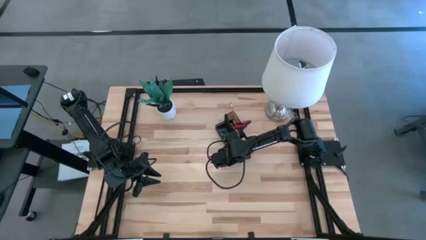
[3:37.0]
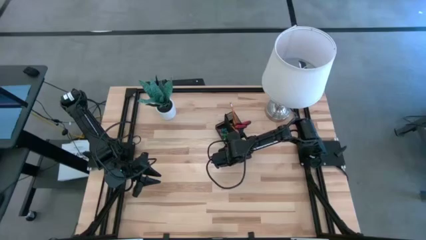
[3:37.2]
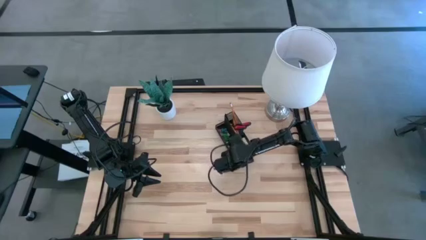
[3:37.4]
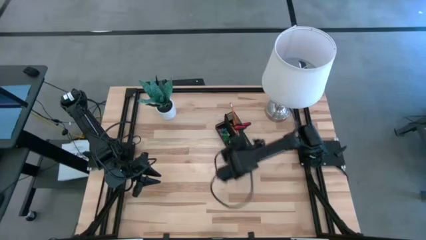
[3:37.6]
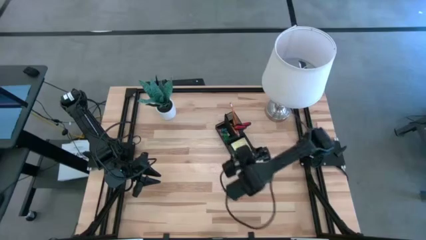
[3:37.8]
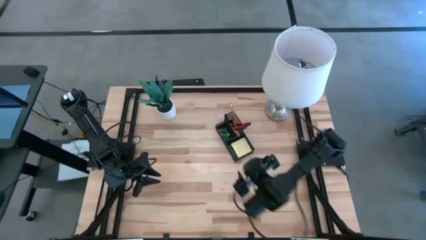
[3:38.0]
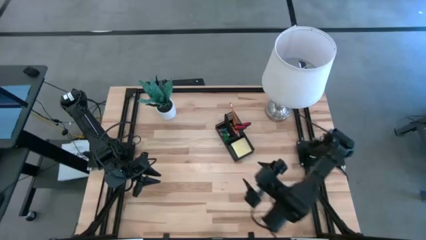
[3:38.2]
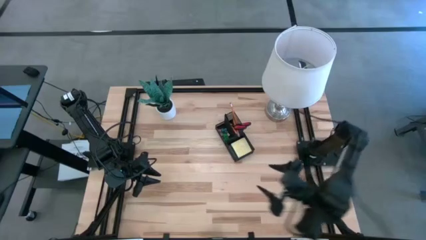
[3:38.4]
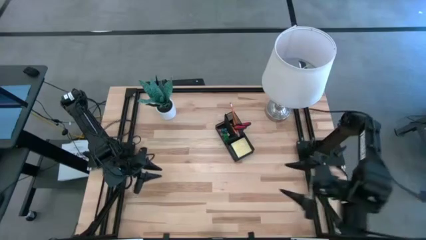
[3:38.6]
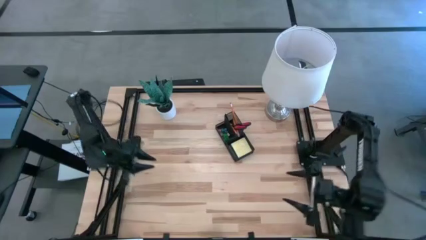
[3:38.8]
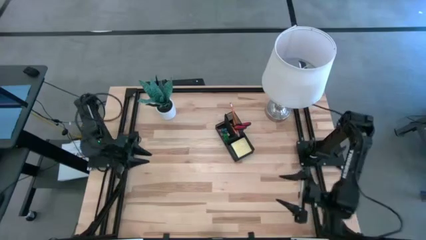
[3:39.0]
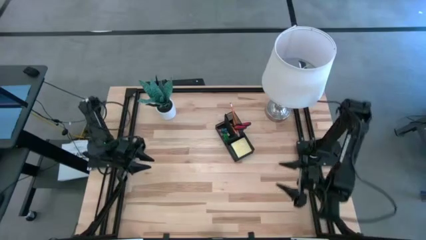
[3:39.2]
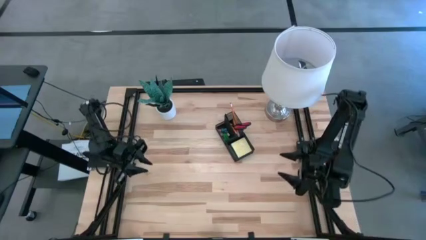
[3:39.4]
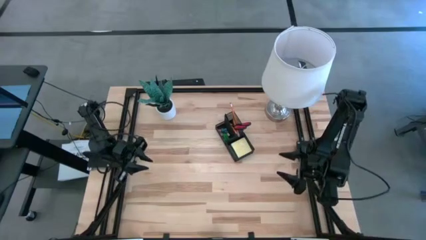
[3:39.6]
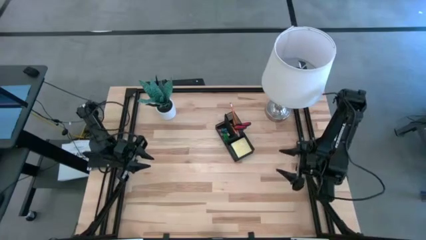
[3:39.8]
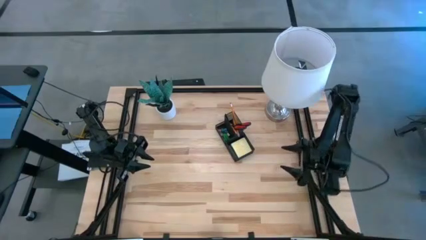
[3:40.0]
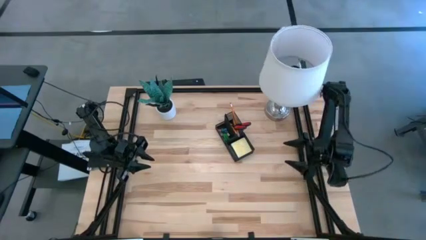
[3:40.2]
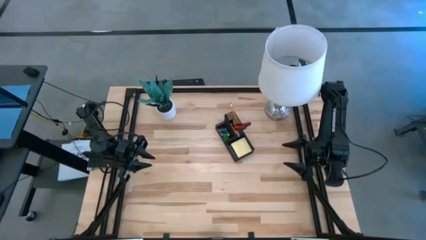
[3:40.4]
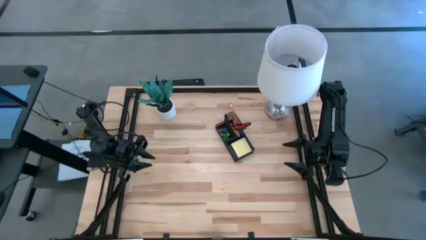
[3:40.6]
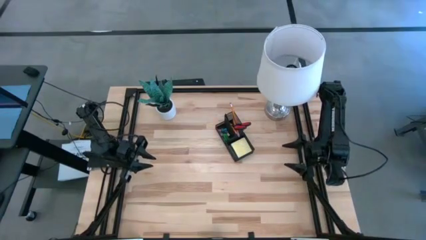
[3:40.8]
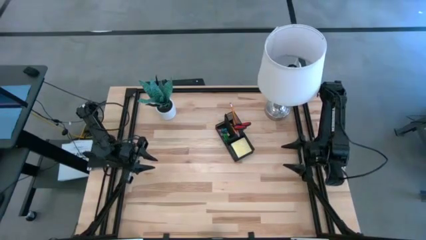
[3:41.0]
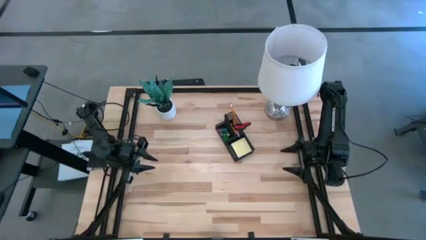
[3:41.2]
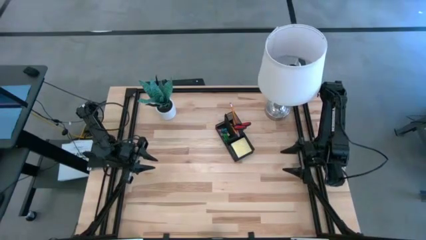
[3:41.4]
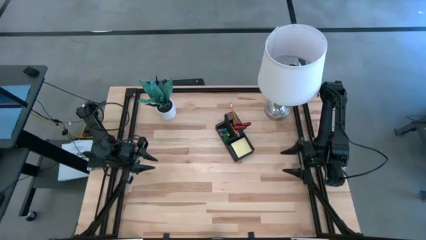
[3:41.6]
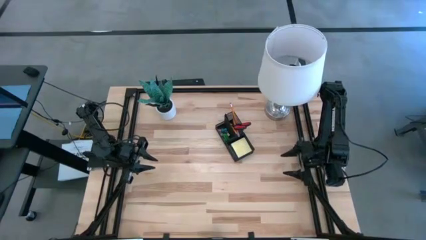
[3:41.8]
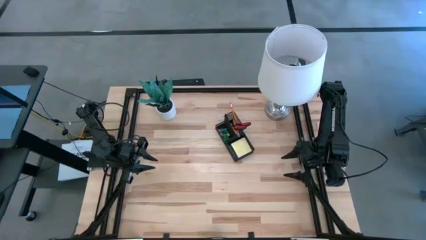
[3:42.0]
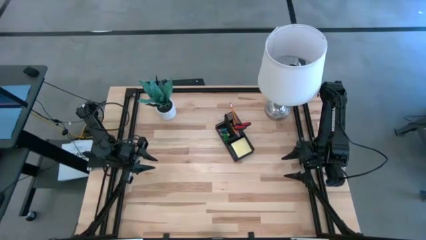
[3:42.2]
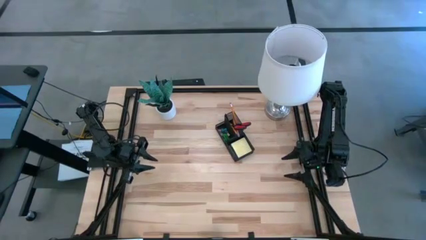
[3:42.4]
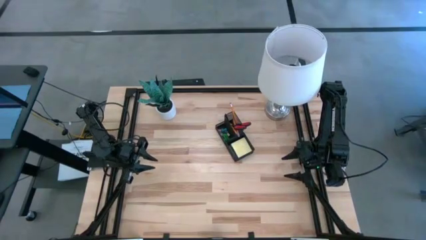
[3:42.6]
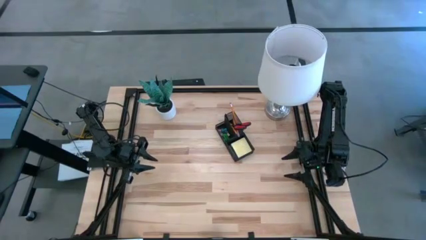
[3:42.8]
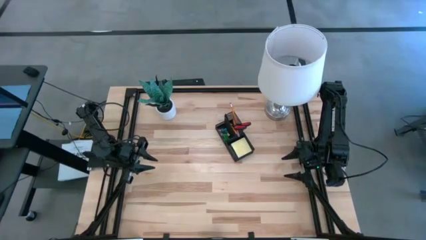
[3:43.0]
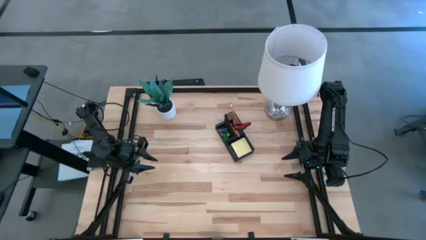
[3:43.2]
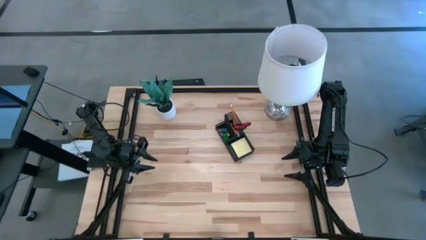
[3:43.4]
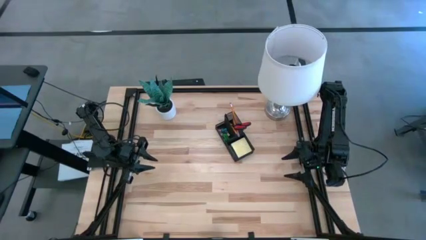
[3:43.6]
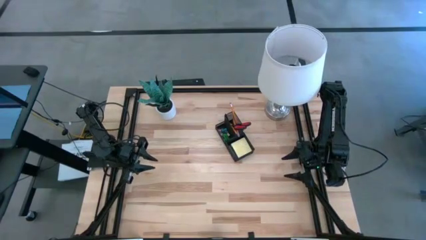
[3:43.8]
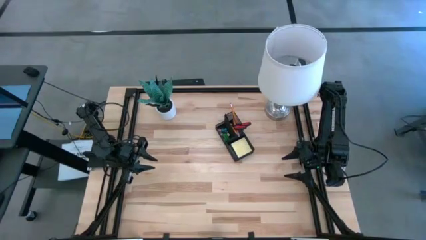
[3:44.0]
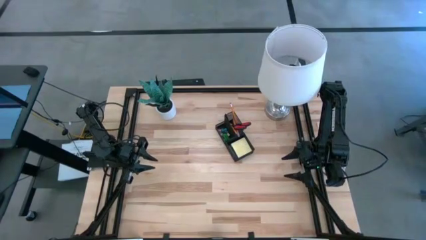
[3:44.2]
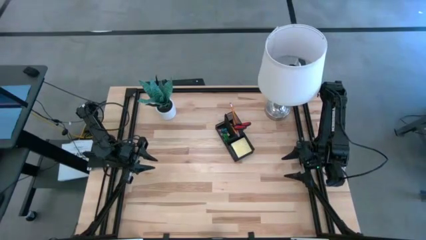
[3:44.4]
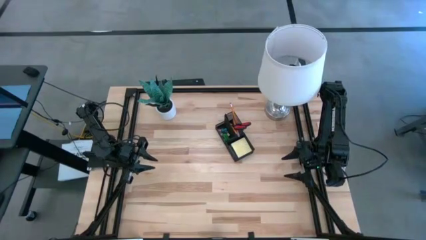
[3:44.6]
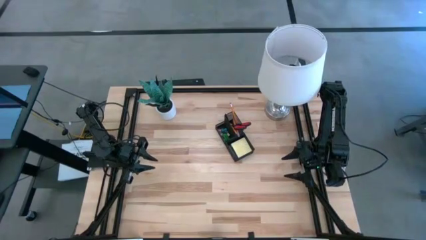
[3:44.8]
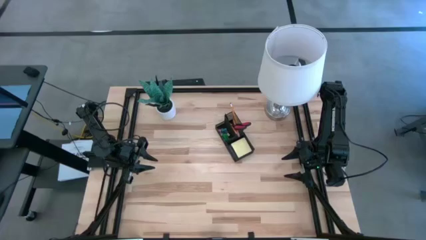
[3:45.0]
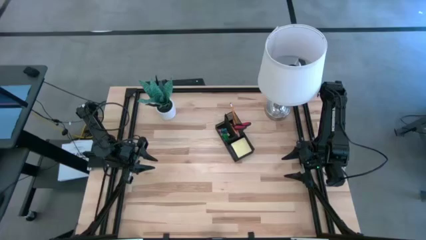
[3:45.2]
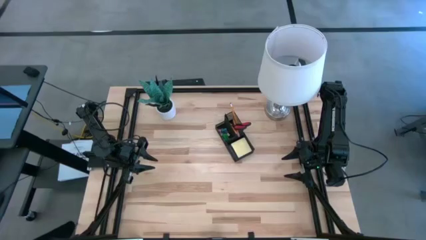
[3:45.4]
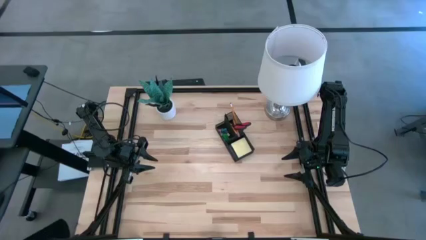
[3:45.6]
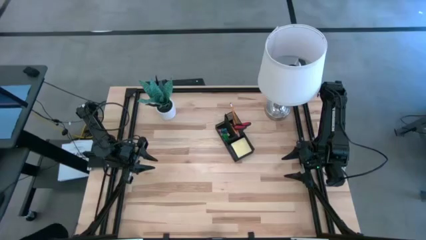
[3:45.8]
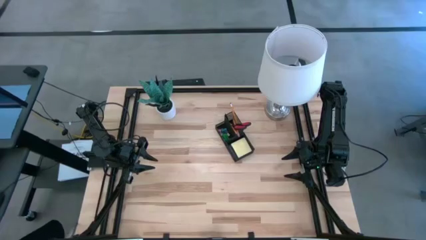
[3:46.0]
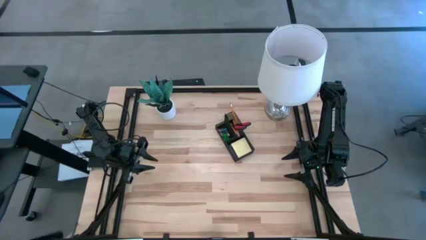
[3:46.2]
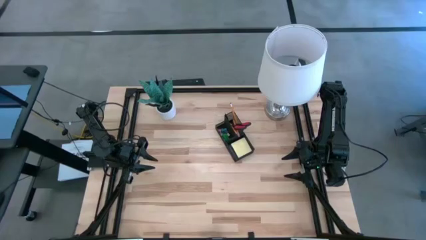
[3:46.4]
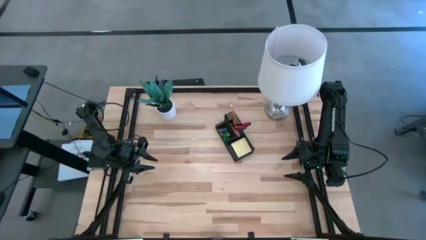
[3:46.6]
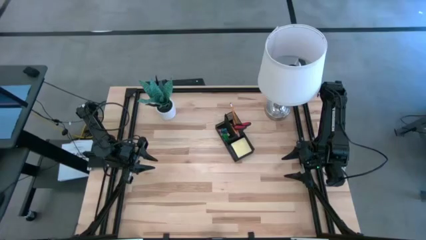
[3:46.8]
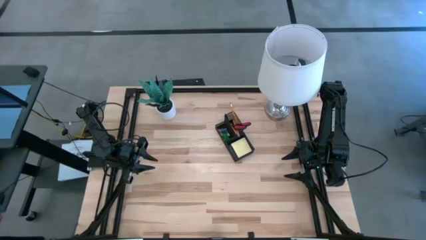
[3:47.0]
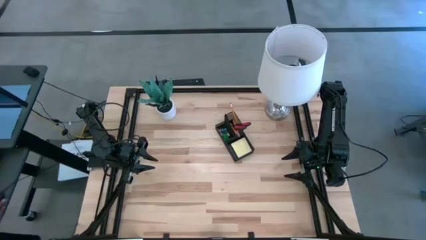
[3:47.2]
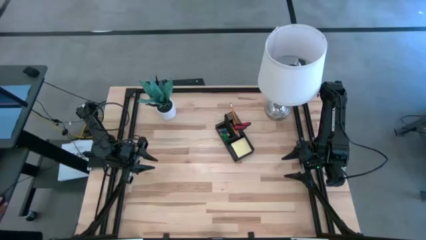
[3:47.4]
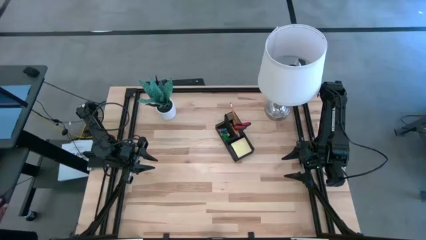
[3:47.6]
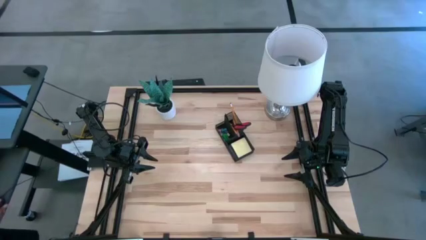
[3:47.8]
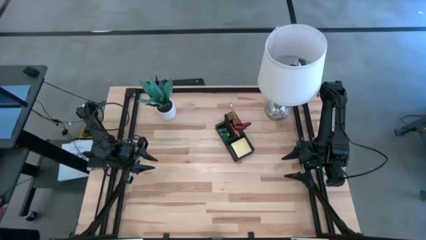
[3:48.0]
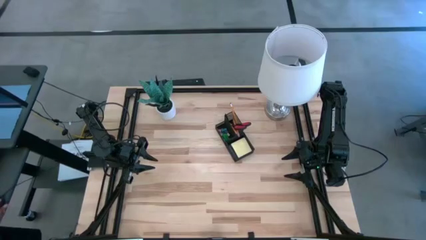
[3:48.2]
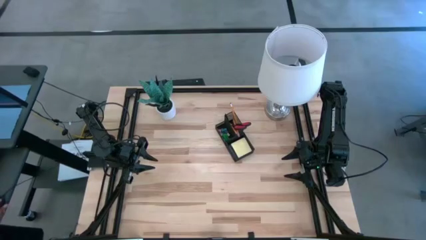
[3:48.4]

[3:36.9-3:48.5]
Task: Pick and place office supplies into organizer
Return to Home Position

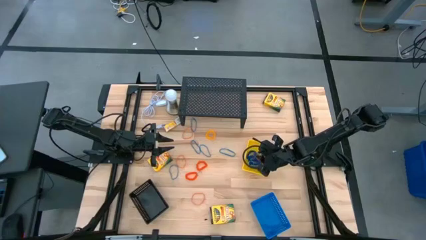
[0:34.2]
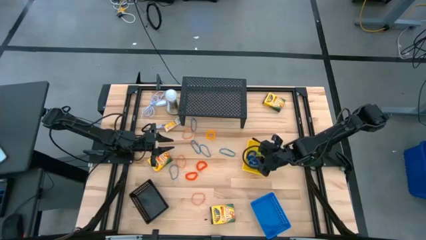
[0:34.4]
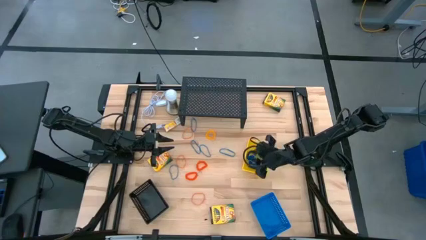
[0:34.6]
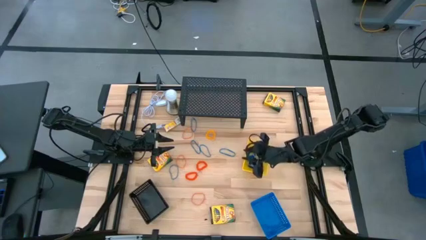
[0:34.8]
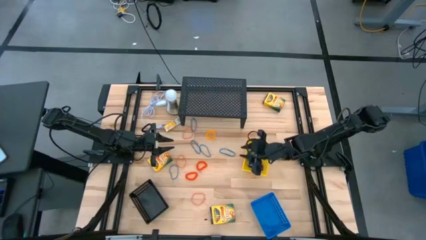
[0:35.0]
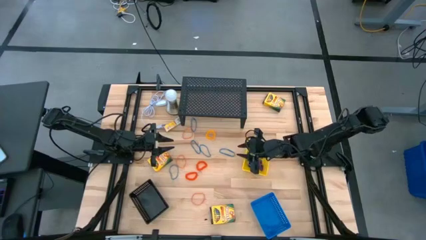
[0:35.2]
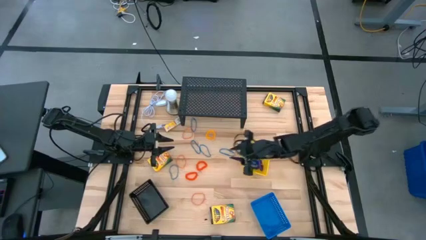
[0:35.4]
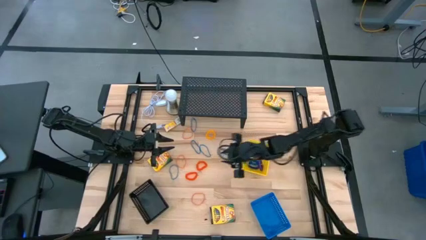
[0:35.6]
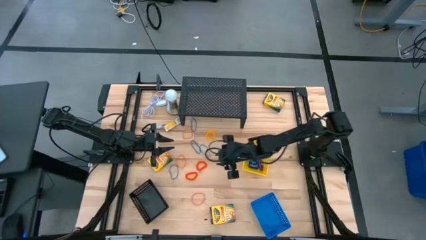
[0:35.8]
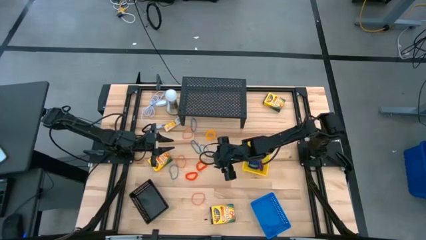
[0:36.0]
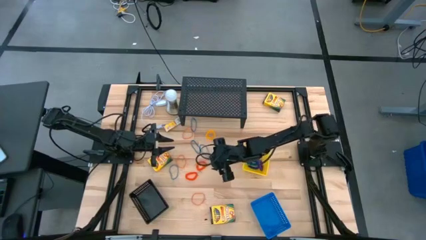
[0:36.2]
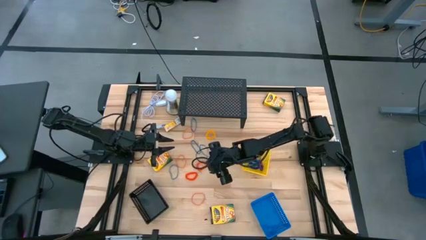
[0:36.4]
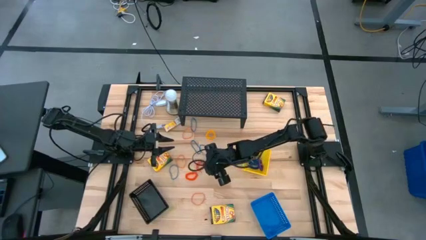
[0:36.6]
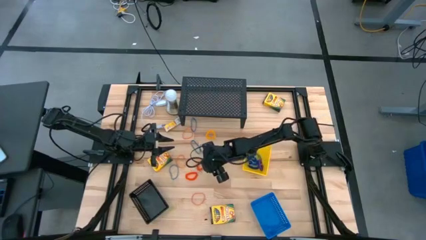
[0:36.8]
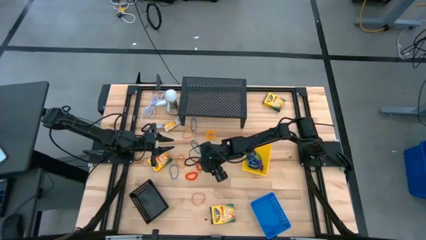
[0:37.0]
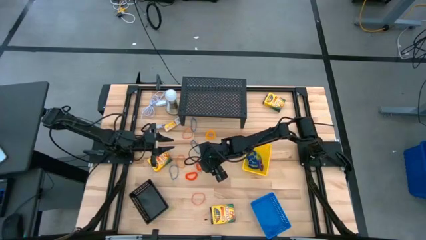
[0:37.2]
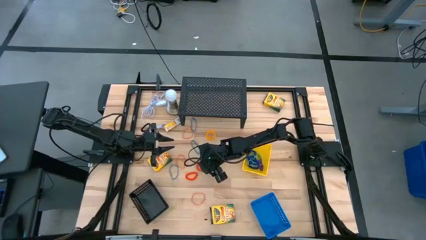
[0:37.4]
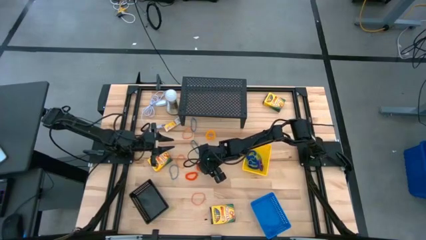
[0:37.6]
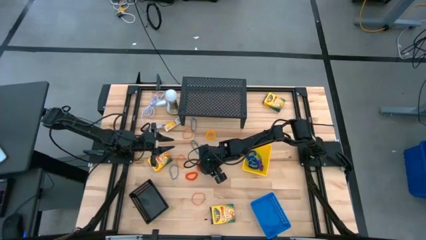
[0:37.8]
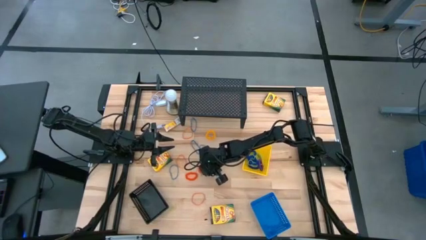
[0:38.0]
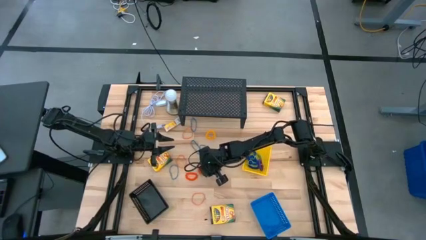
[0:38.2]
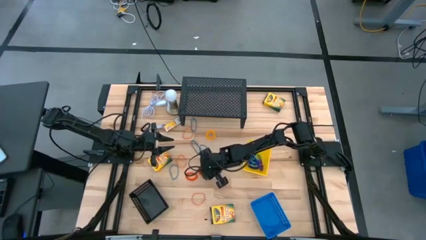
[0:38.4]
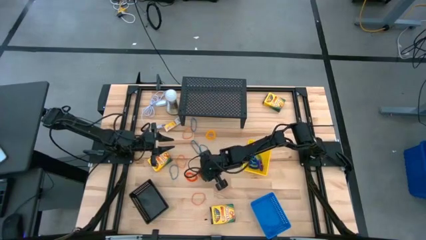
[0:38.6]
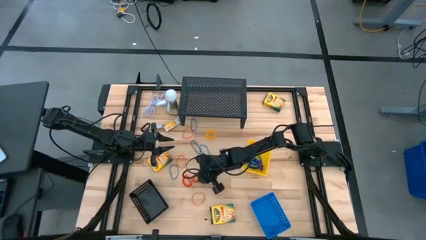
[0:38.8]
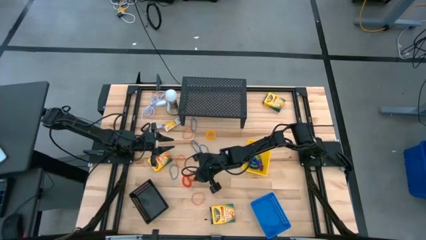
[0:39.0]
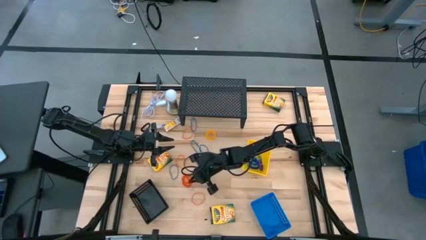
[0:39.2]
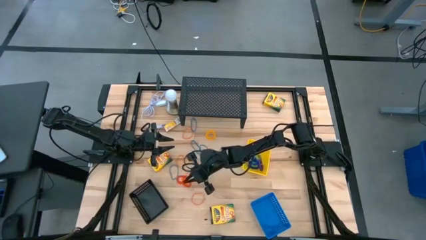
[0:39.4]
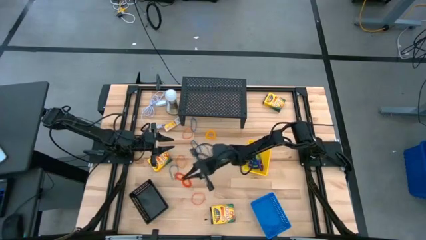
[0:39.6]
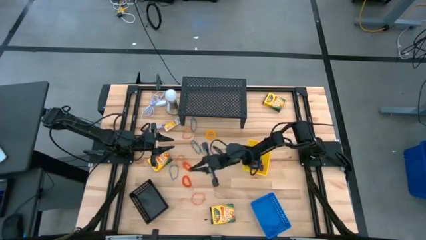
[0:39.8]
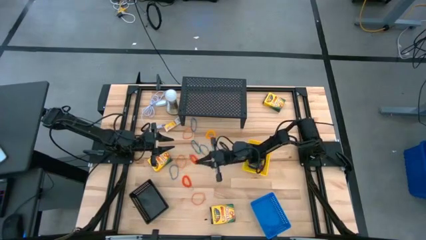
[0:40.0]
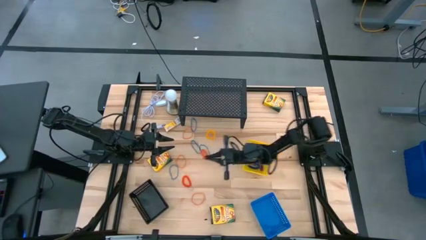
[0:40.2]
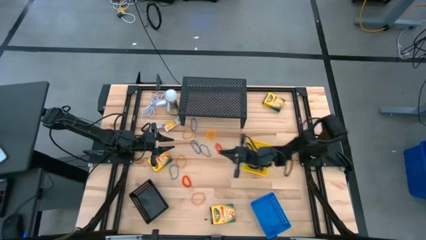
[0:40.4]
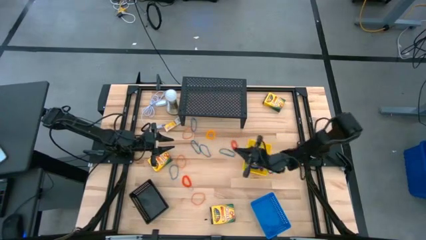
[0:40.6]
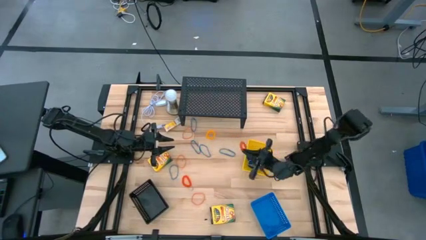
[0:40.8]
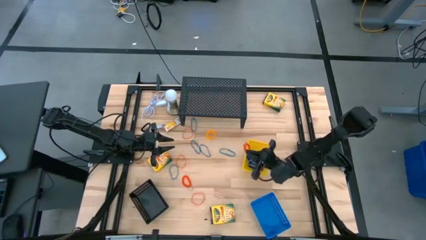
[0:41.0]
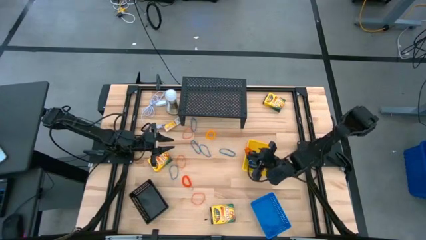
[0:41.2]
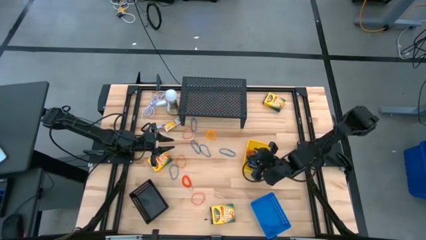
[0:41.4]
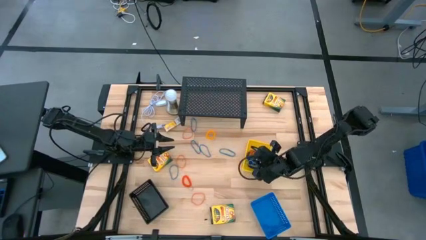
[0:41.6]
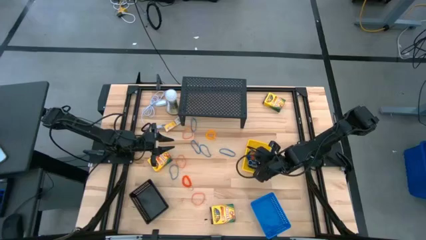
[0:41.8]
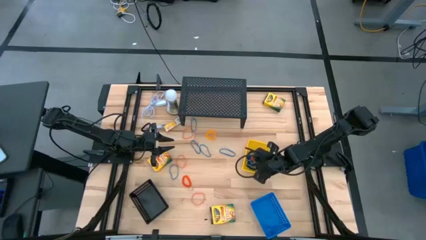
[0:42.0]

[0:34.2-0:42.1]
Task: Pick & Place Office Desk Supplies
Put the orange spring keychain into the yellow basket
